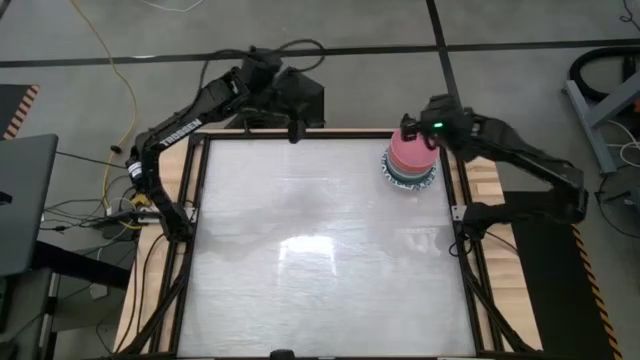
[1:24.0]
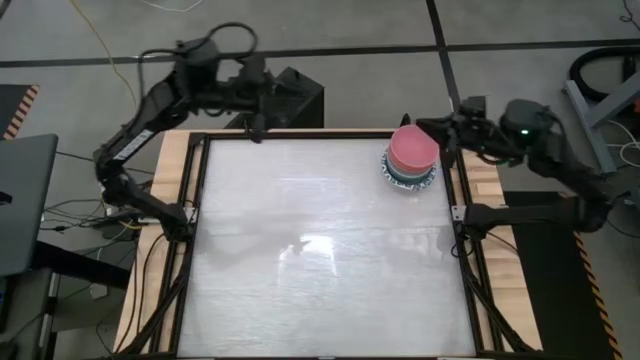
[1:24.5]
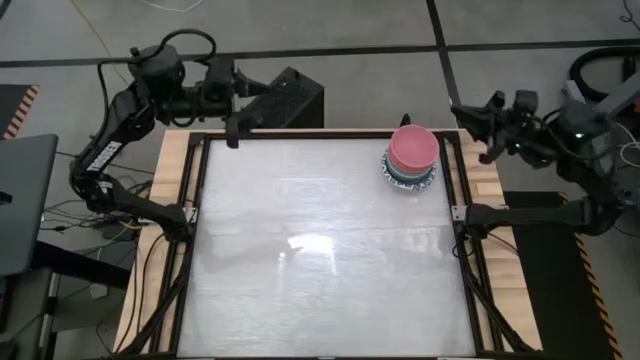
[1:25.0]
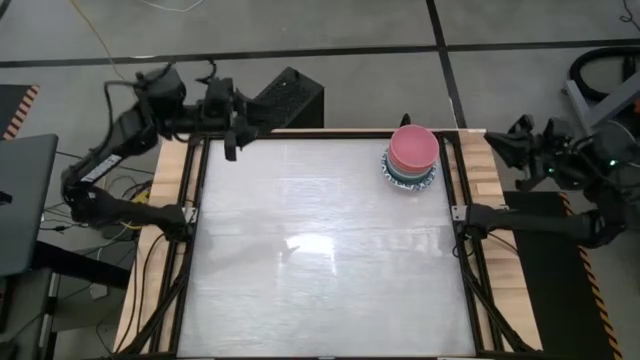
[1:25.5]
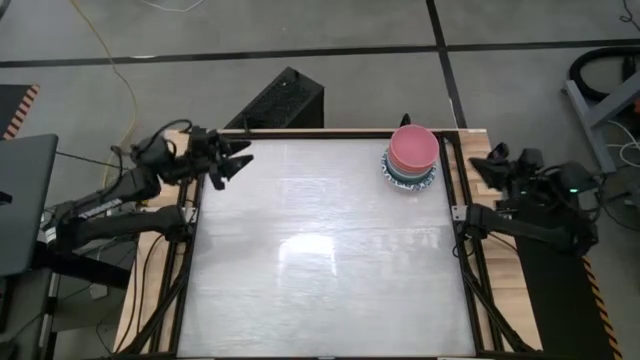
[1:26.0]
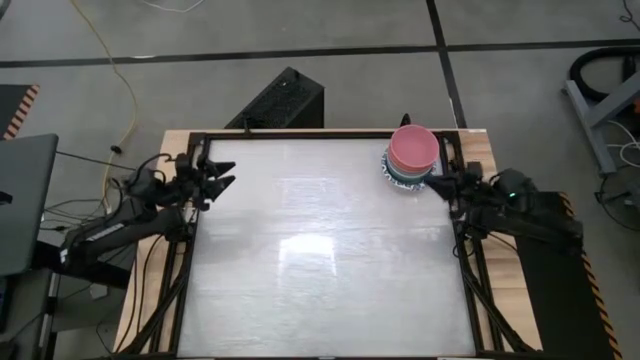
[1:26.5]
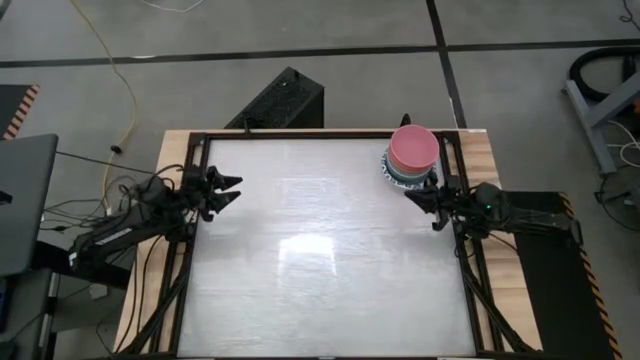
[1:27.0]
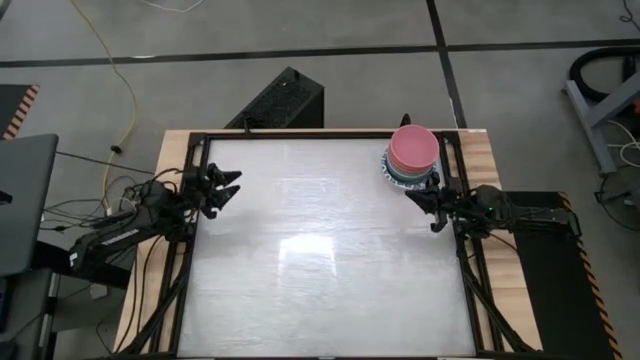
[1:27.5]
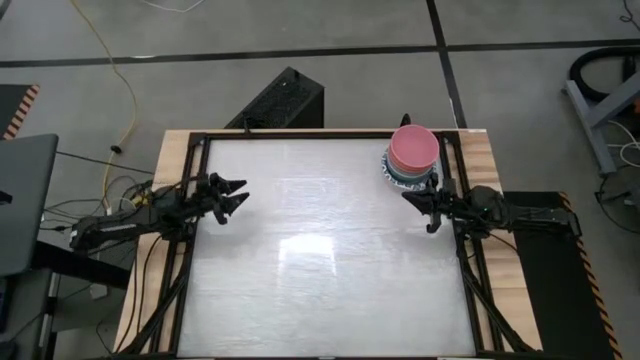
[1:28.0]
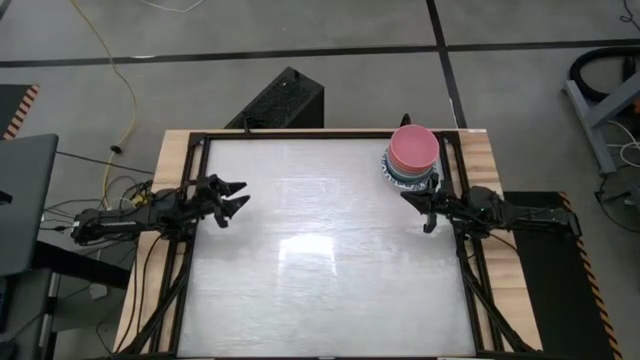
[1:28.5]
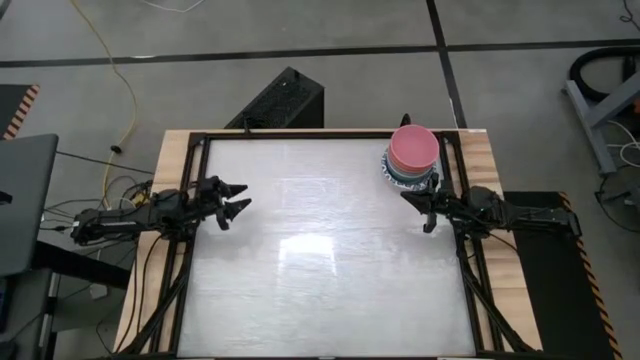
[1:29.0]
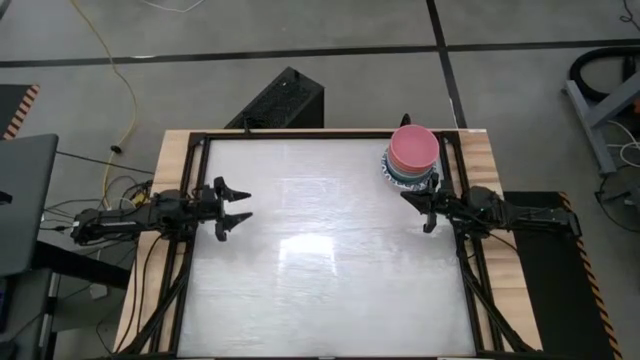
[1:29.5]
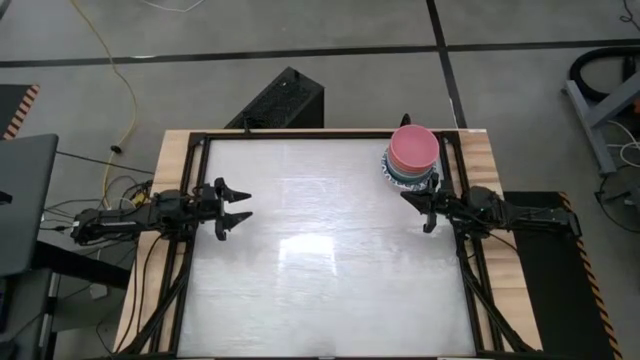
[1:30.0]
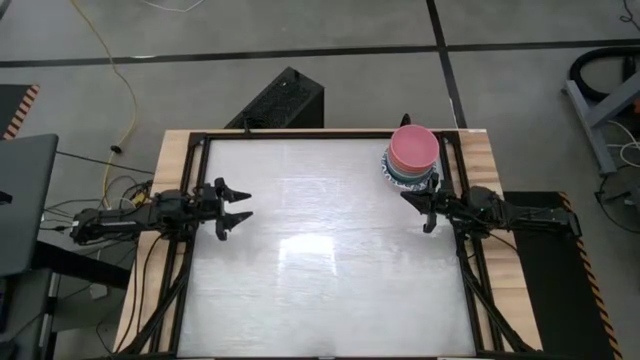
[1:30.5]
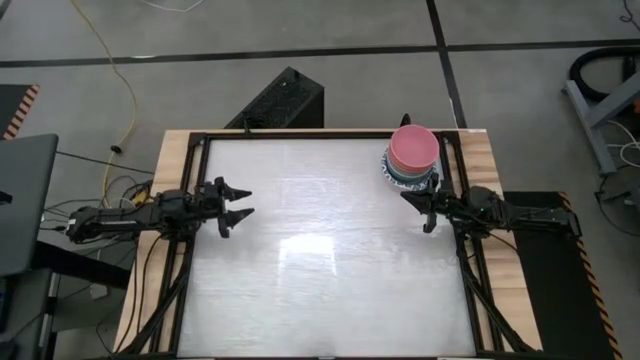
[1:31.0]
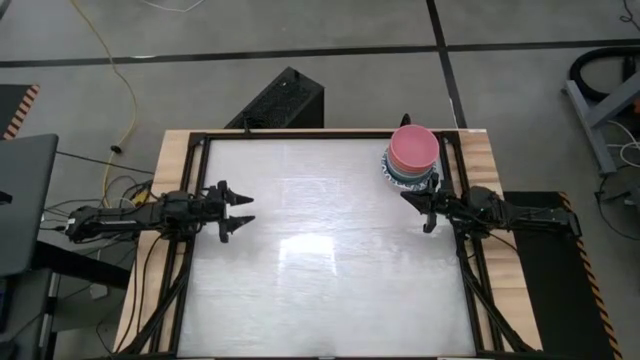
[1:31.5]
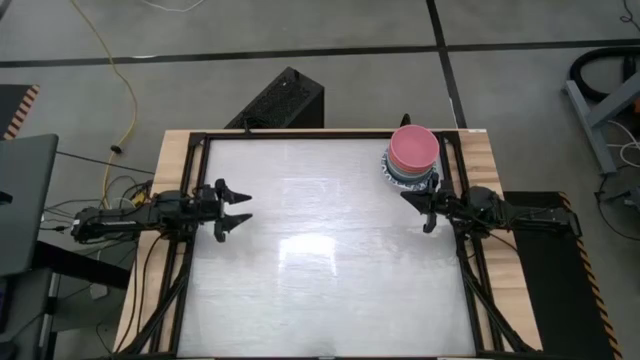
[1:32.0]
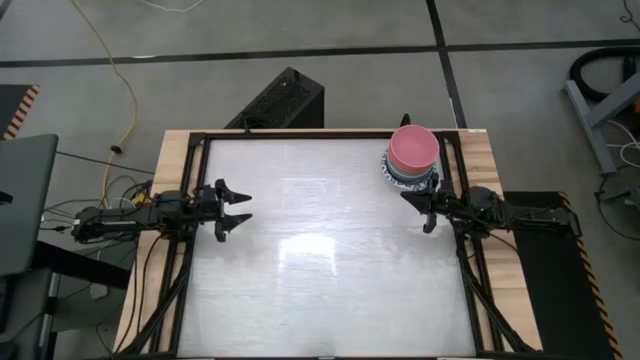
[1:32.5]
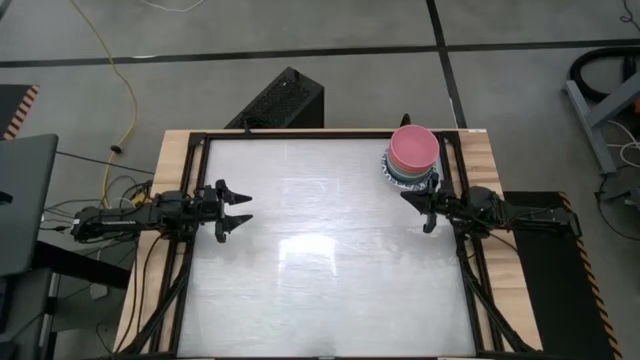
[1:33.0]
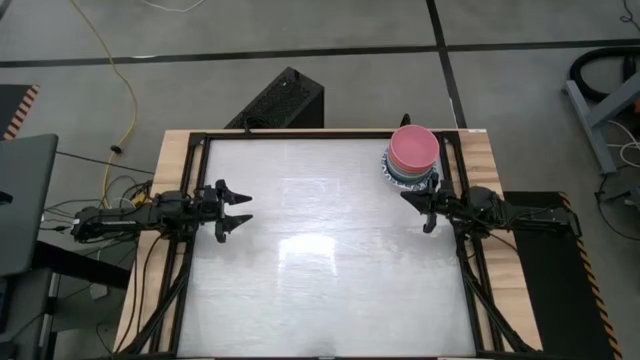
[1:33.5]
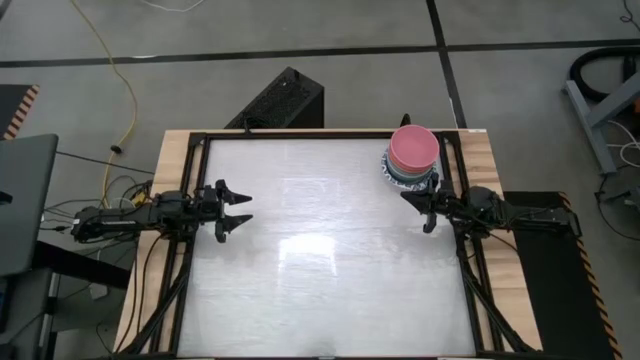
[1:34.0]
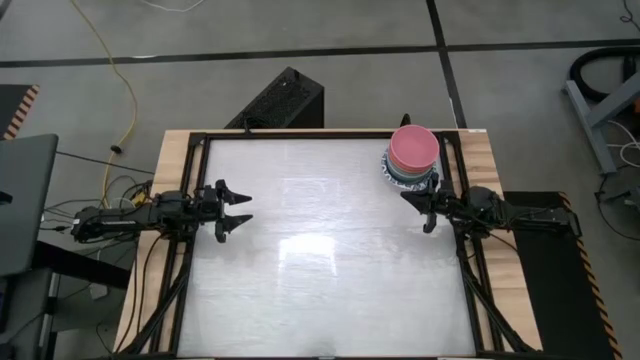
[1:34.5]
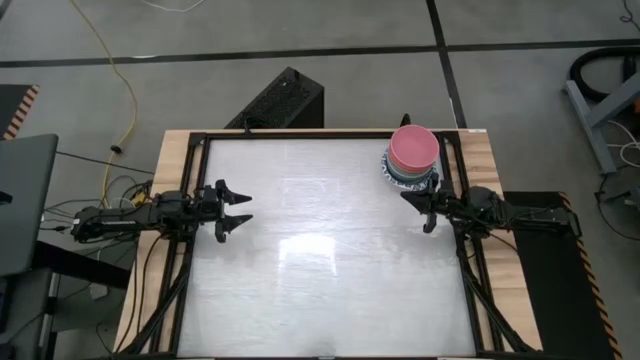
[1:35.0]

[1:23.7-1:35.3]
Return to Home Position
